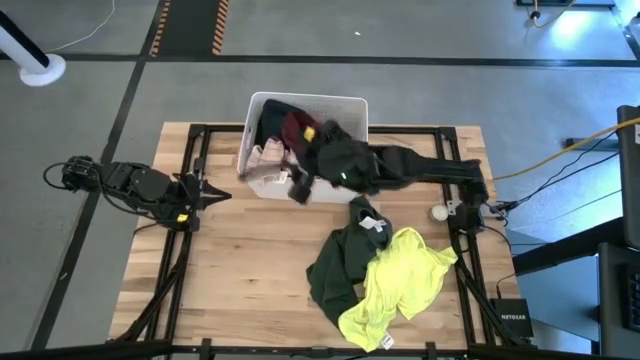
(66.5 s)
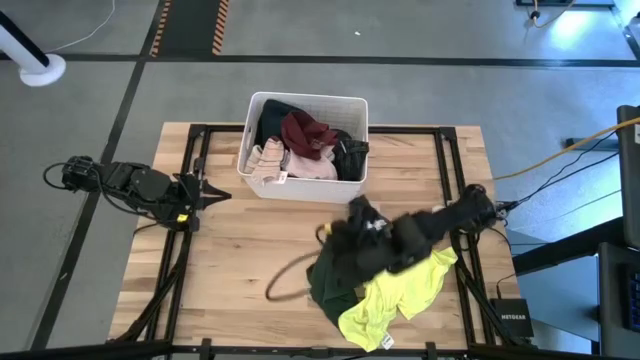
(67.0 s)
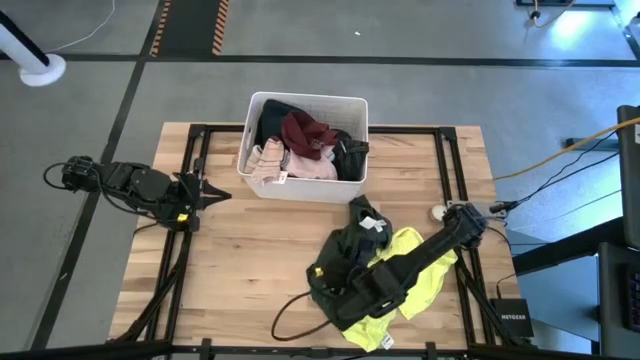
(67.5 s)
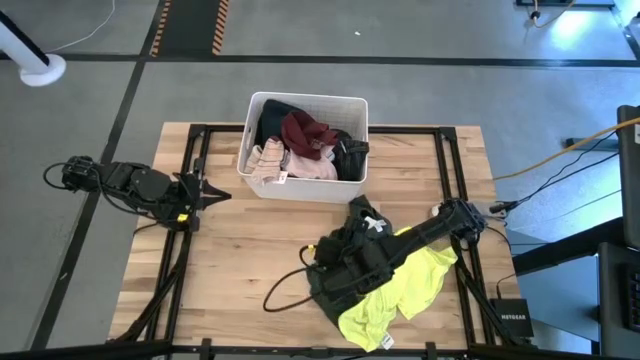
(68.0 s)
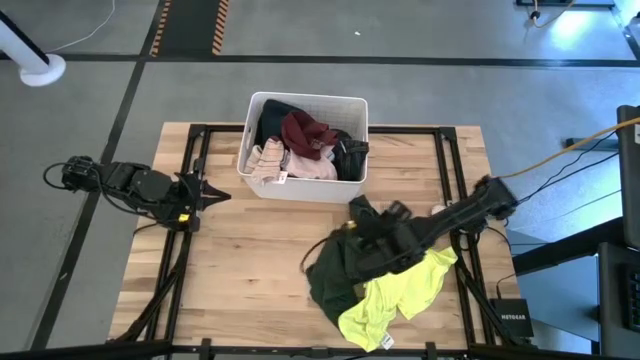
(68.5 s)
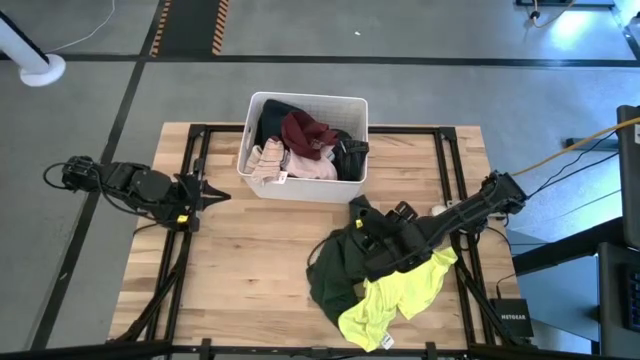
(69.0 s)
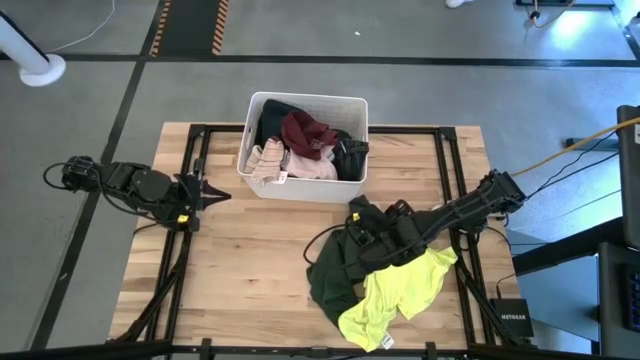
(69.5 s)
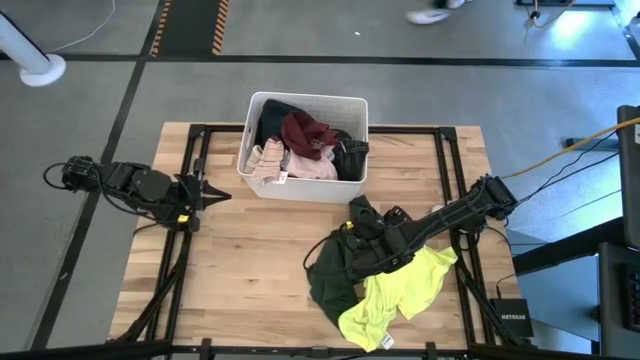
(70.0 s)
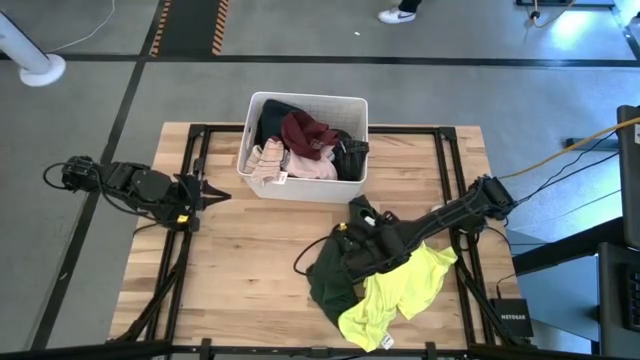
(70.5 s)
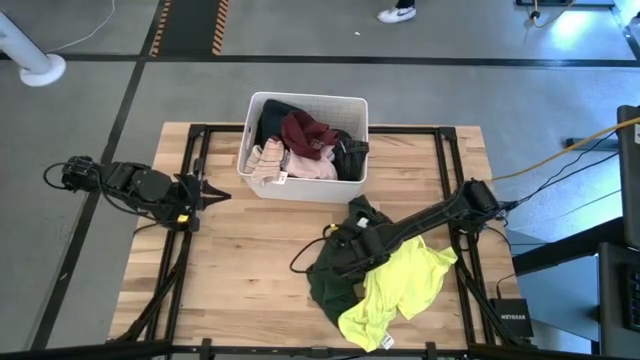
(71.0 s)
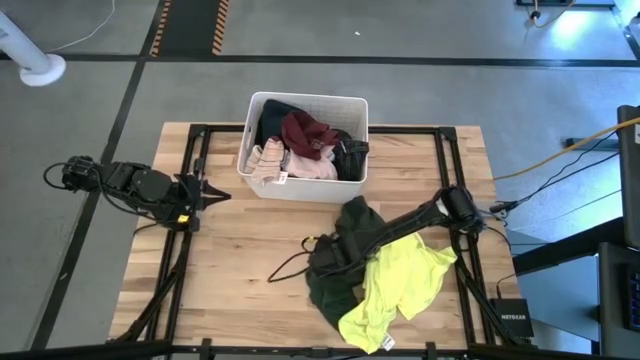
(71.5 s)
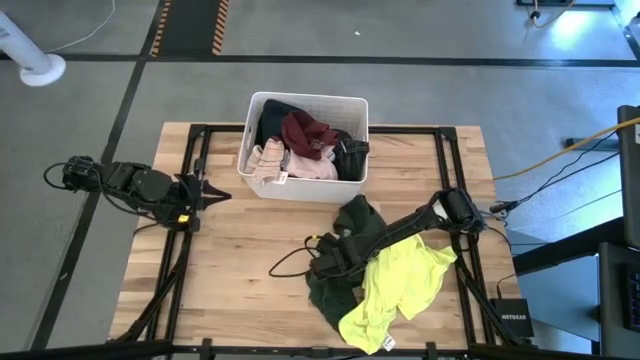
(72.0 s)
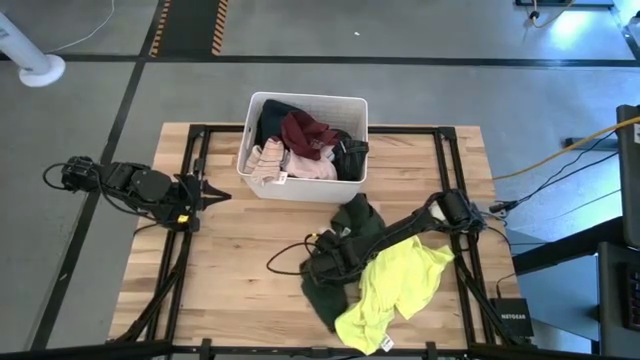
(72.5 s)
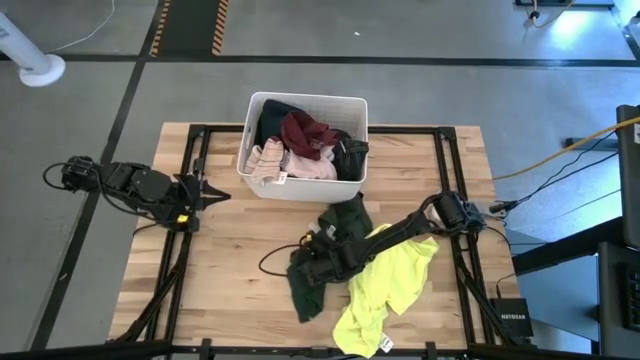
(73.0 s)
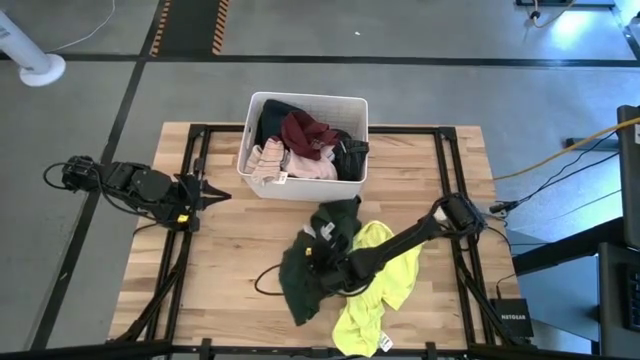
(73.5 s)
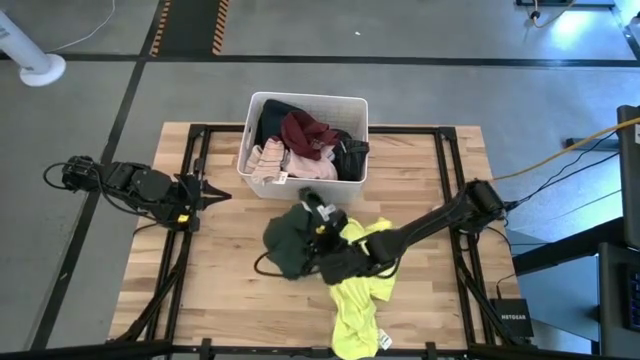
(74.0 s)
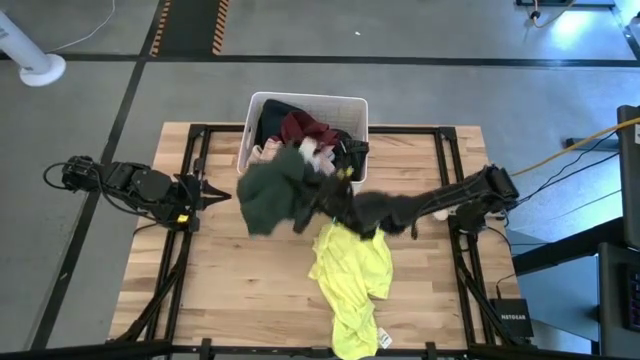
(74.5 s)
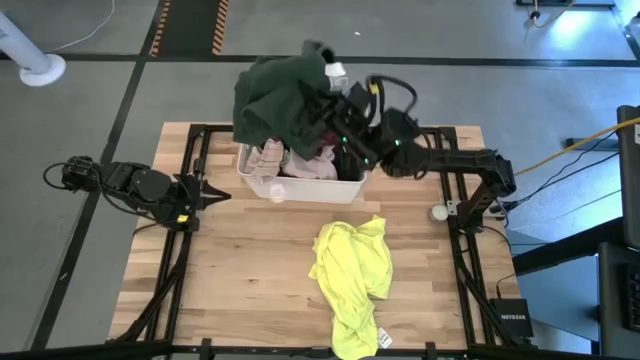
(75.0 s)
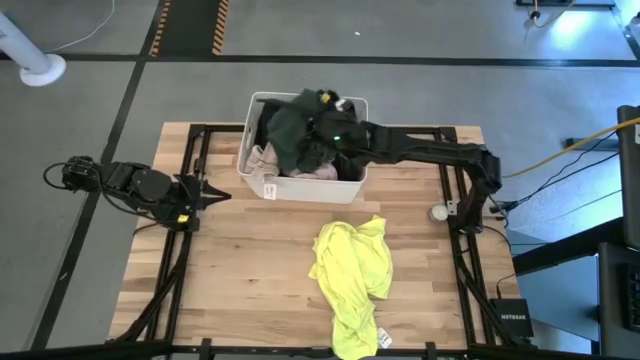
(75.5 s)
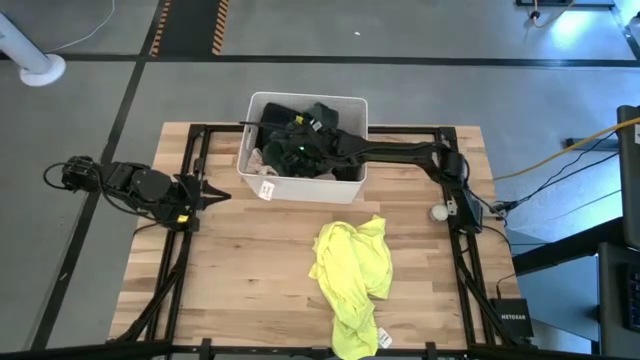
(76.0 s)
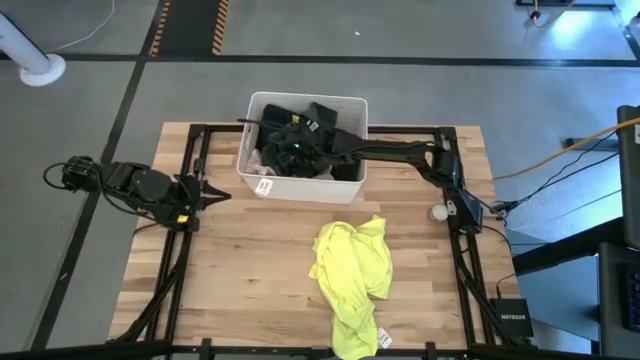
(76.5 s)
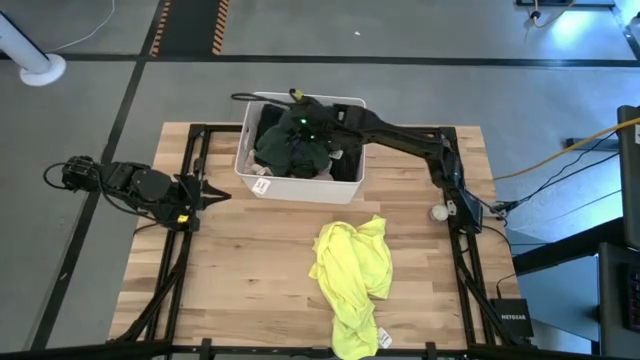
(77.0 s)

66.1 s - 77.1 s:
Task: Sort clothes
Put the green shirt into the laundry bin

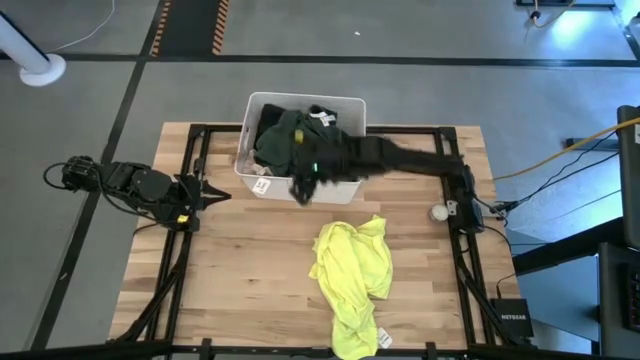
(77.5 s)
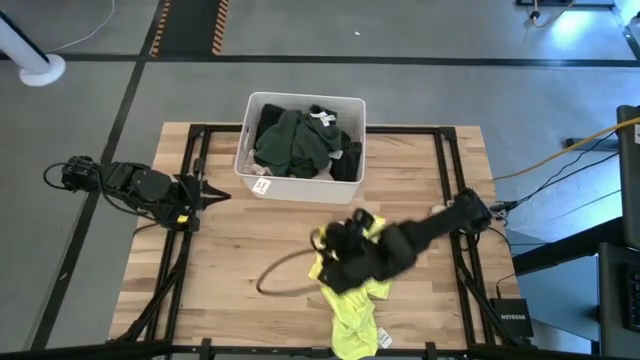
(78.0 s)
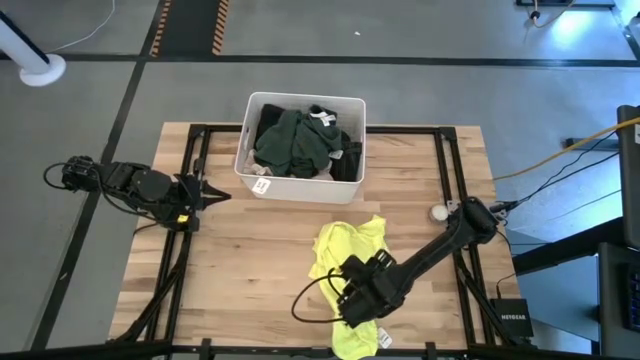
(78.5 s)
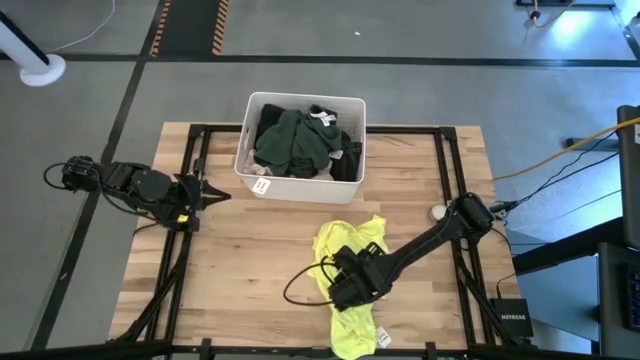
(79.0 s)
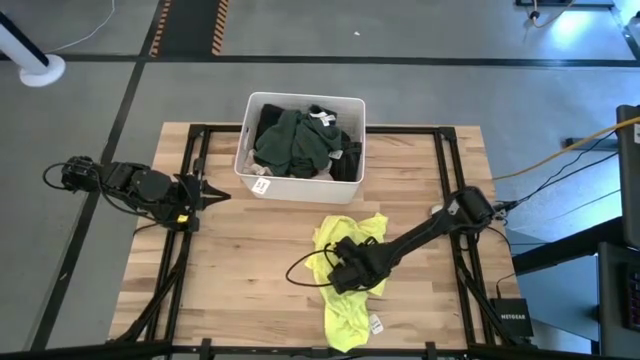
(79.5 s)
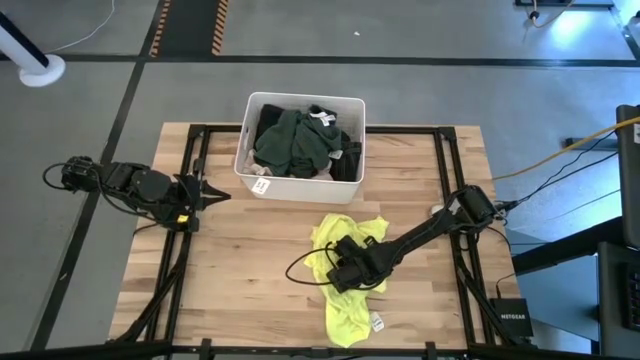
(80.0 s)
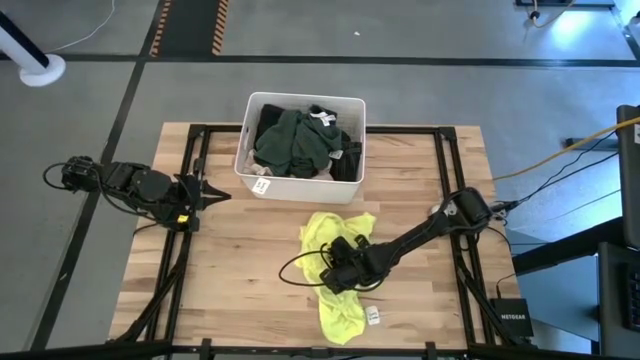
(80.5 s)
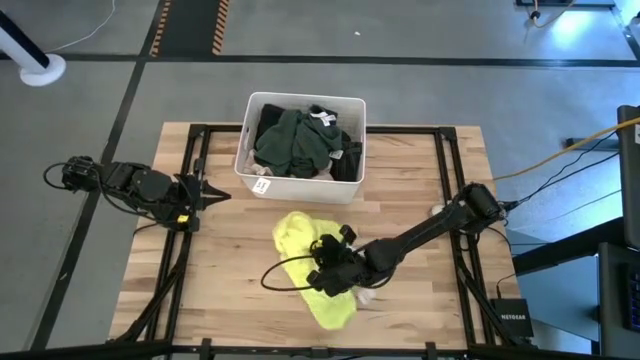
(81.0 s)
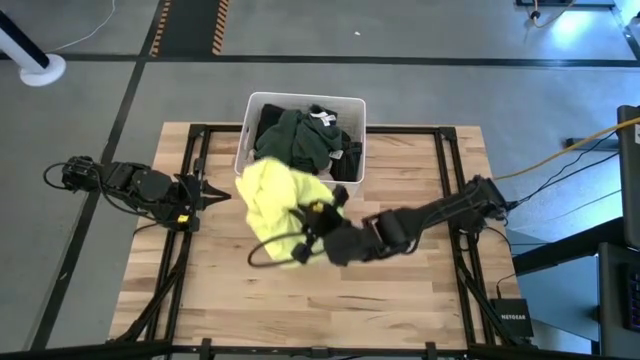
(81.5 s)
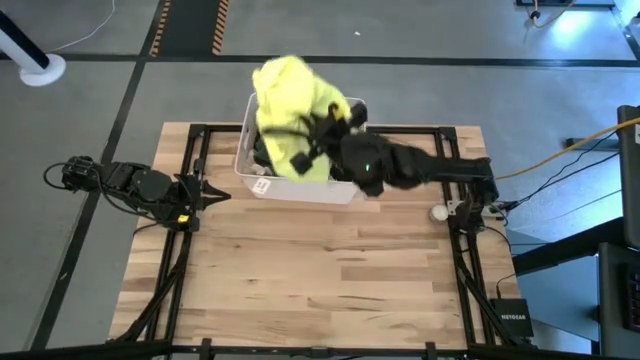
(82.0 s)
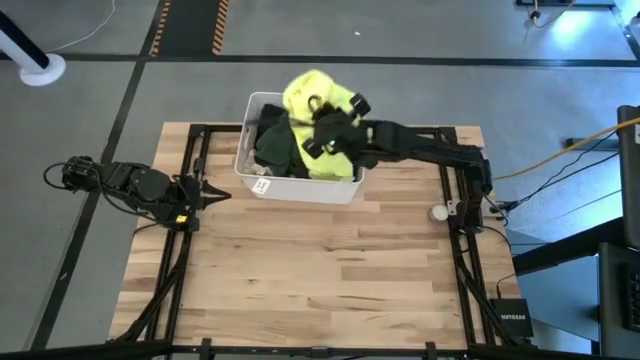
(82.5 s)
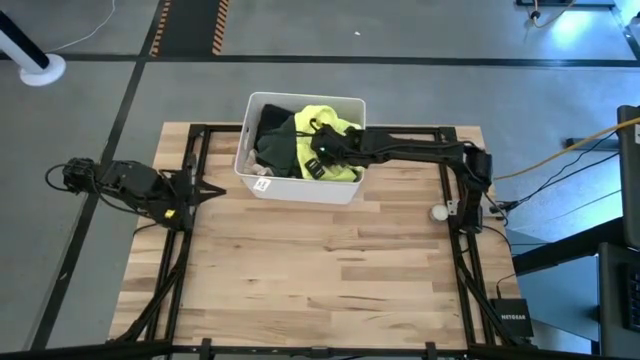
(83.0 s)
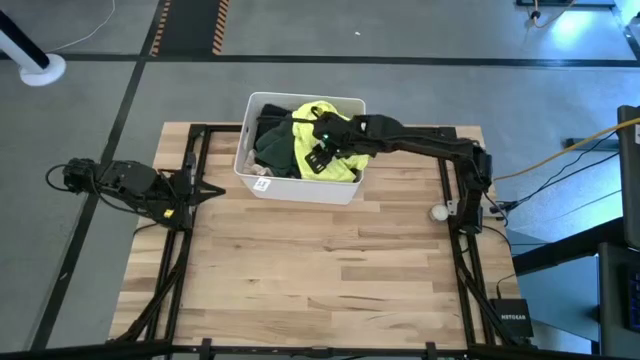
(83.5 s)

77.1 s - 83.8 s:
Put the yellow shirt into the laundry bin

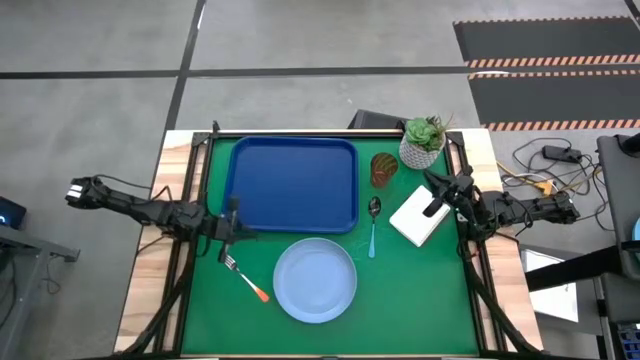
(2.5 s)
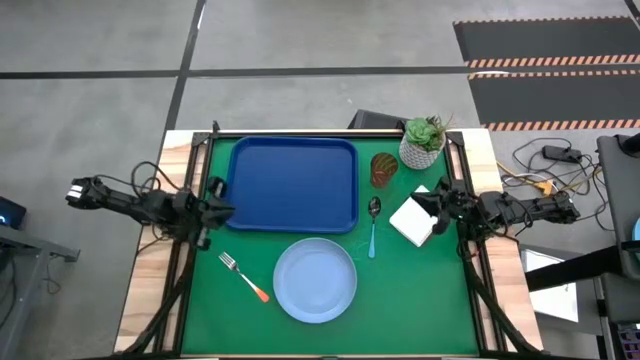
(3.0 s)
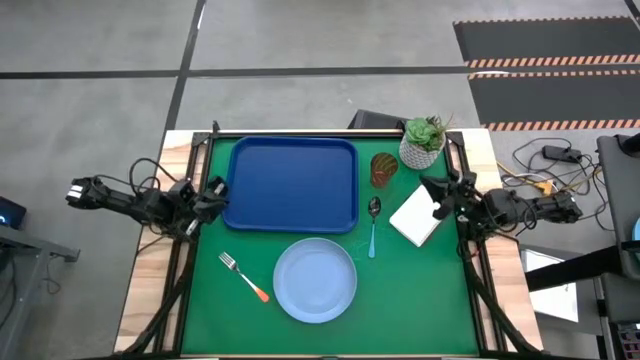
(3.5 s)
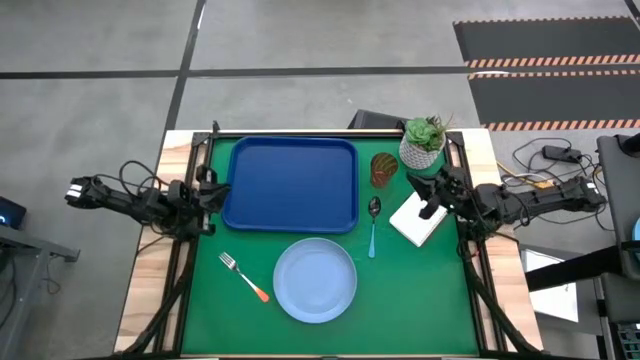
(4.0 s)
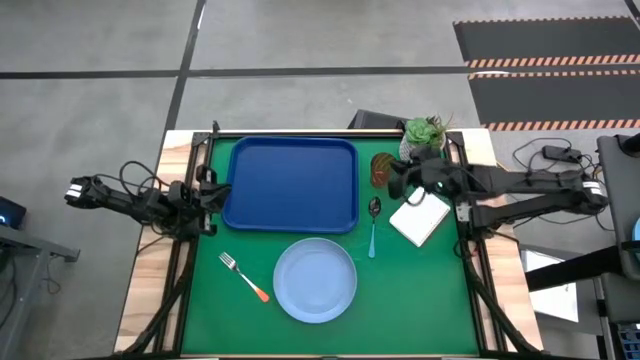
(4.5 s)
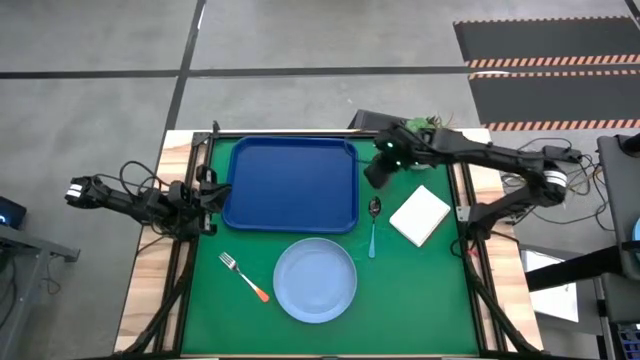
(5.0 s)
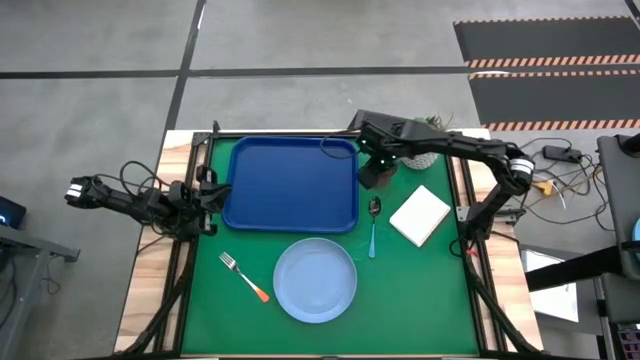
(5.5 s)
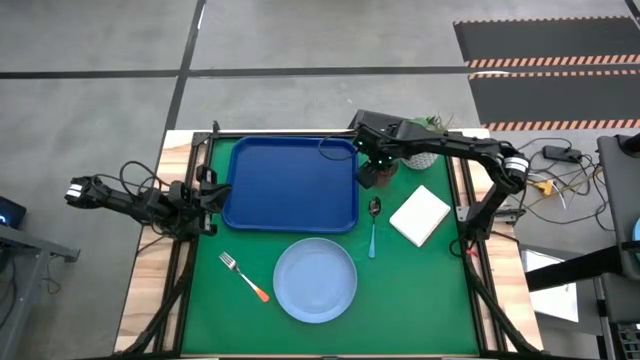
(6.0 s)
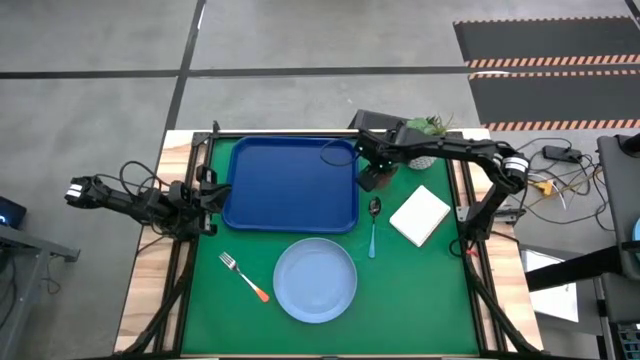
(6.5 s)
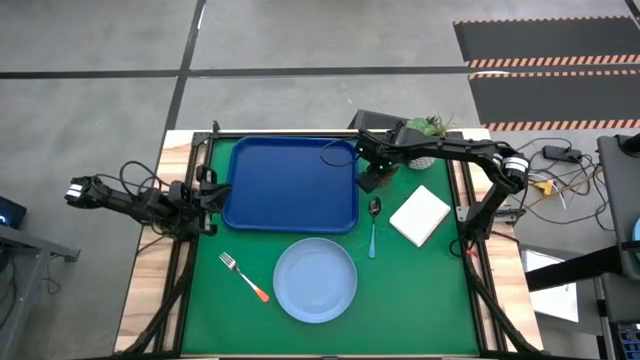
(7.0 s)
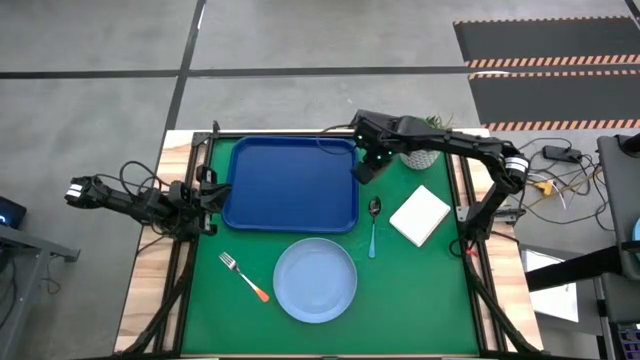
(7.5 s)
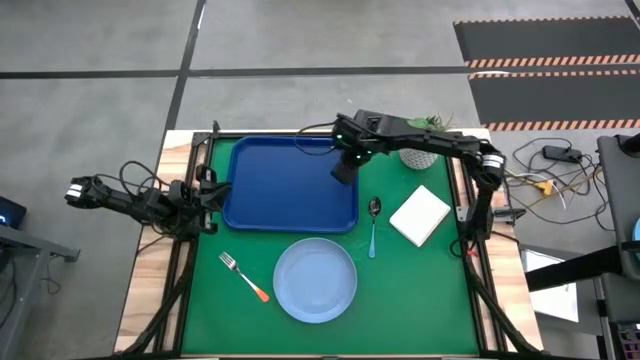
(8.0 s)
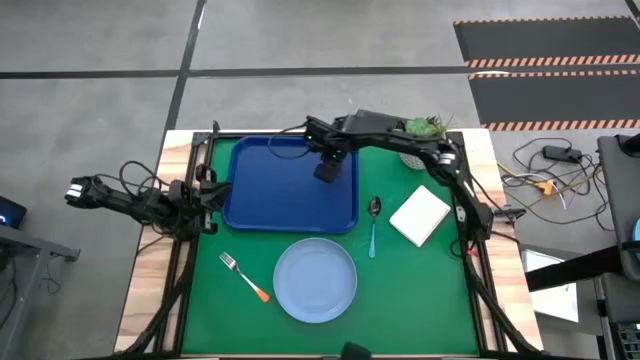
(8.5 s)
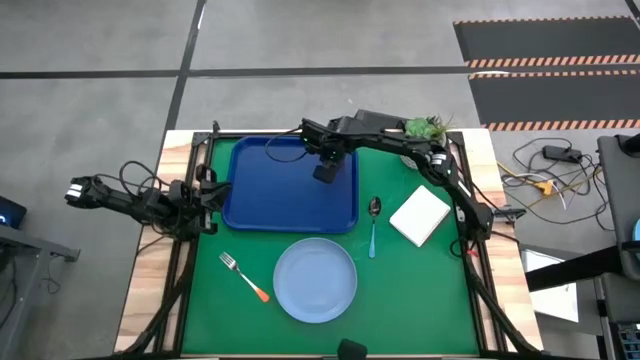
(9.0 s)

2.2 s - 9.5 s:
Task: Pick and place plate/cup/fork/spoon on tray
Put the orange cup on the top right of the blue tray
